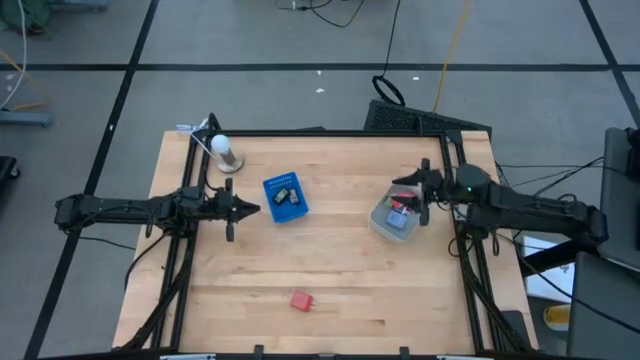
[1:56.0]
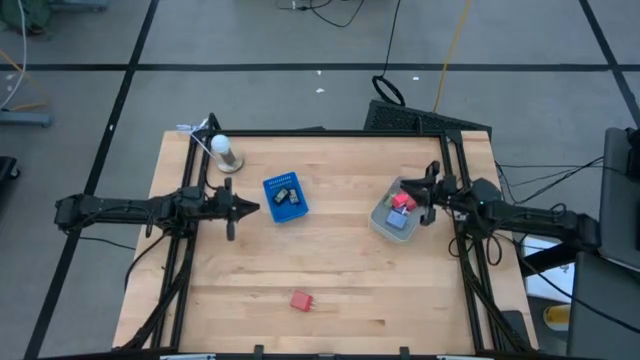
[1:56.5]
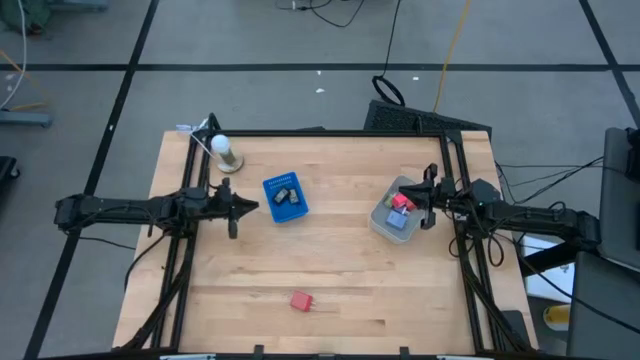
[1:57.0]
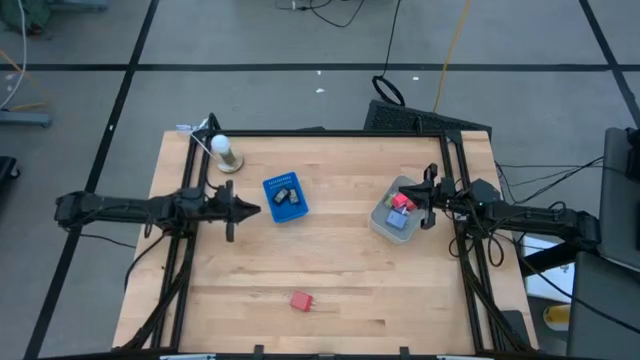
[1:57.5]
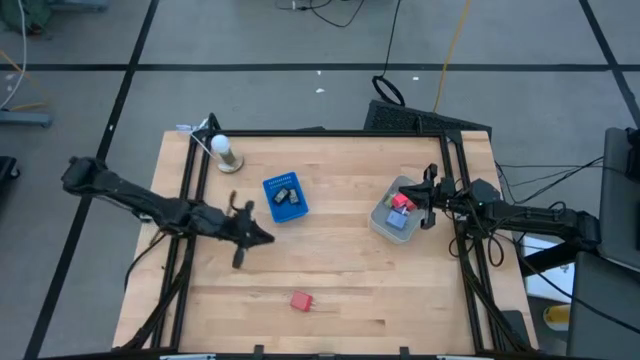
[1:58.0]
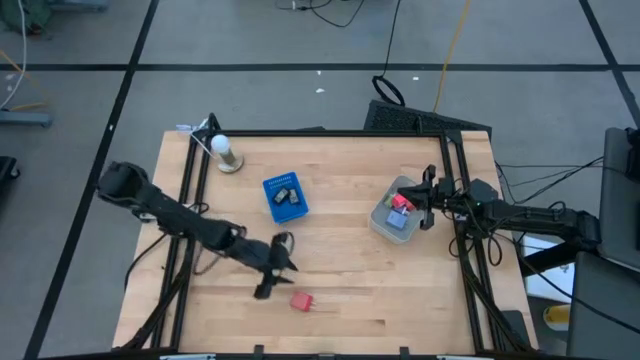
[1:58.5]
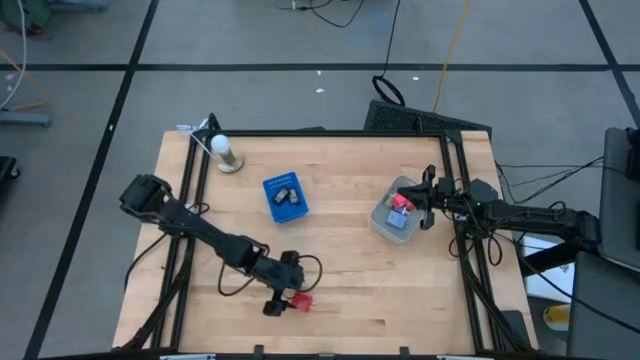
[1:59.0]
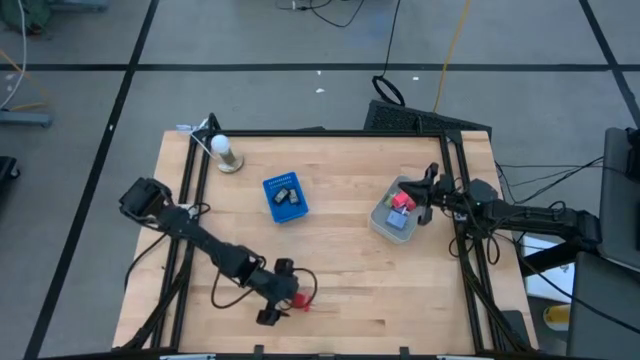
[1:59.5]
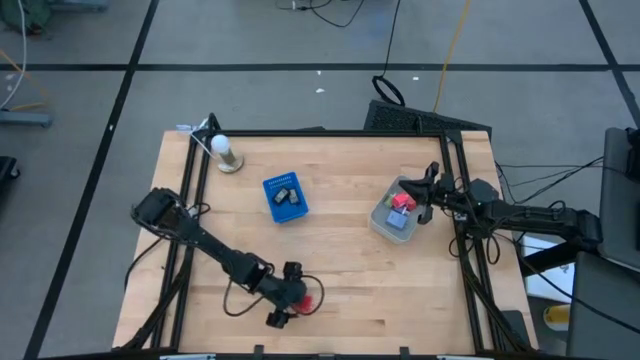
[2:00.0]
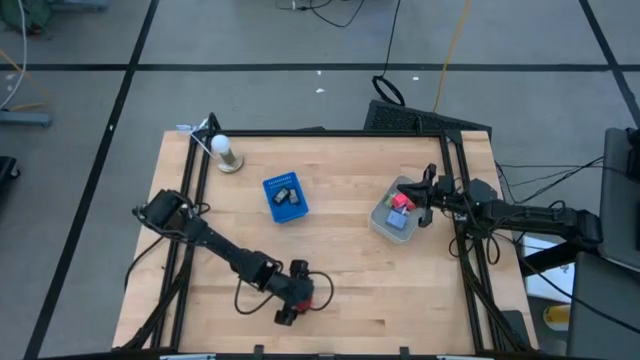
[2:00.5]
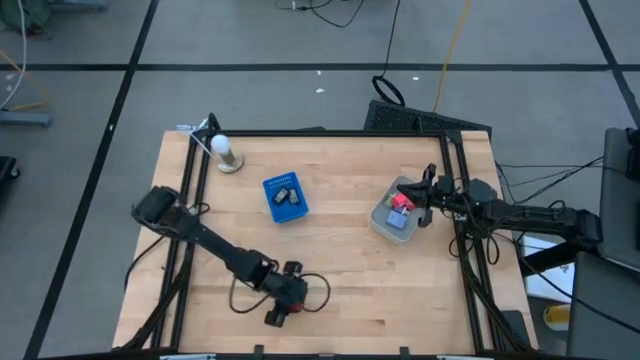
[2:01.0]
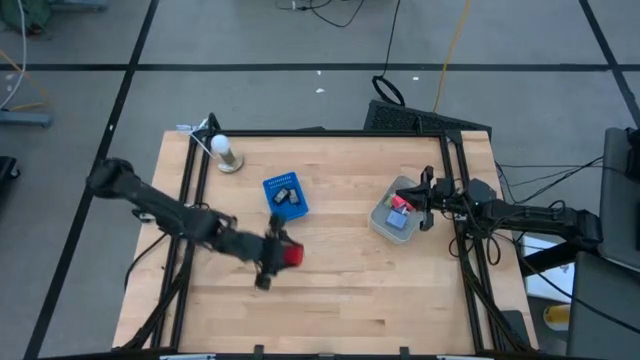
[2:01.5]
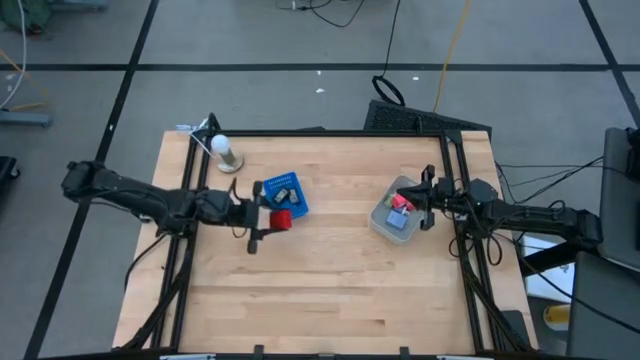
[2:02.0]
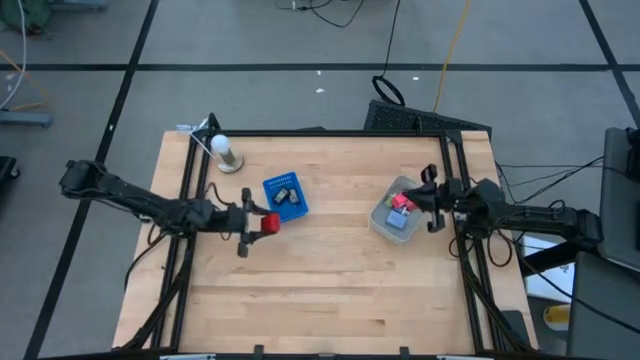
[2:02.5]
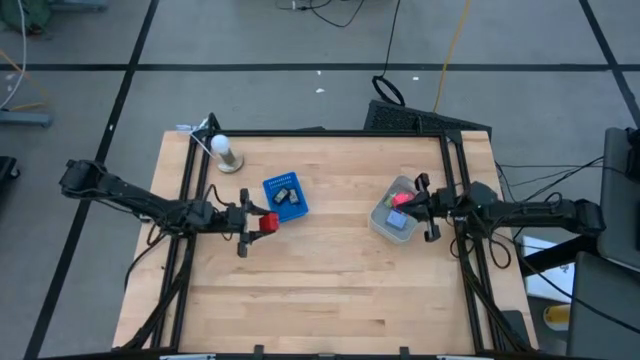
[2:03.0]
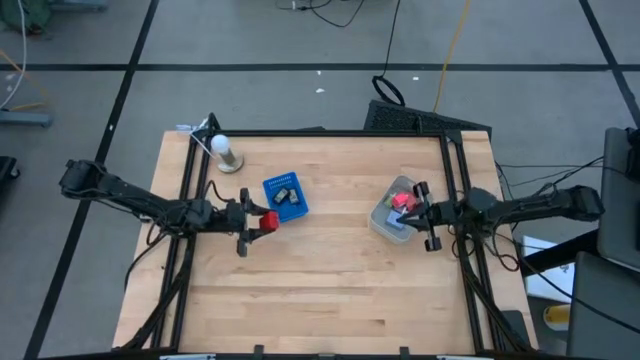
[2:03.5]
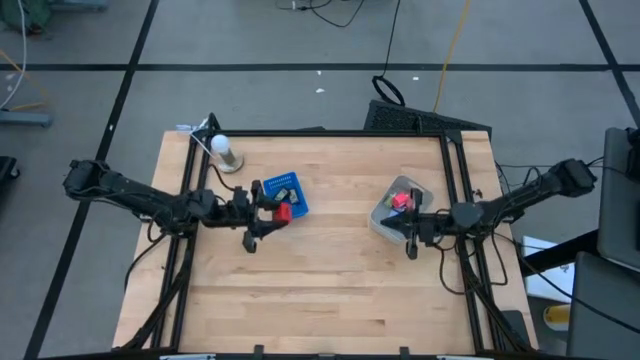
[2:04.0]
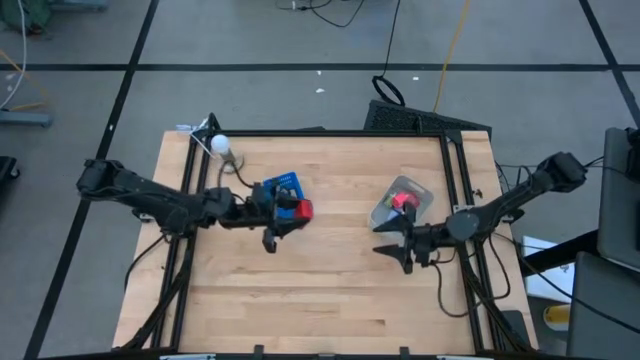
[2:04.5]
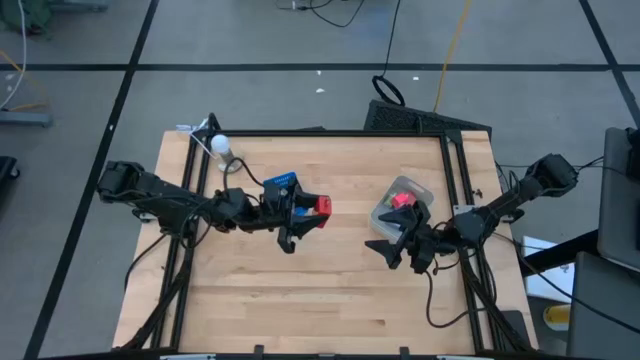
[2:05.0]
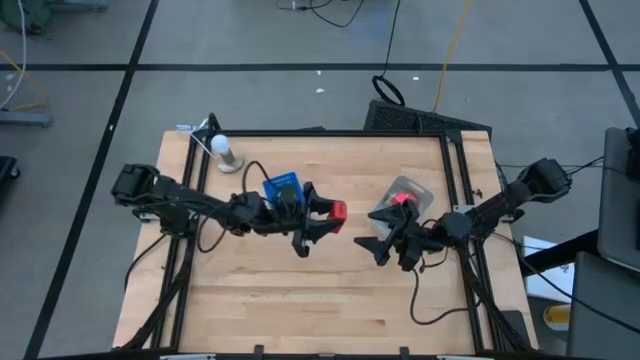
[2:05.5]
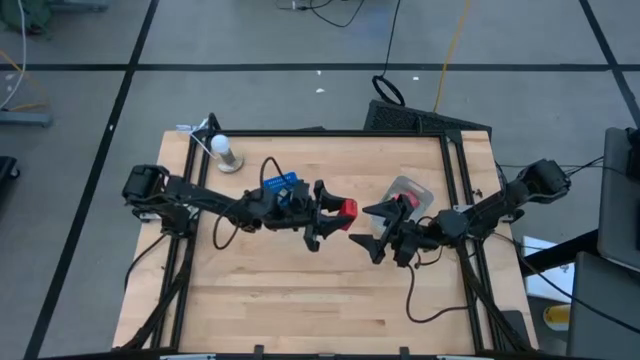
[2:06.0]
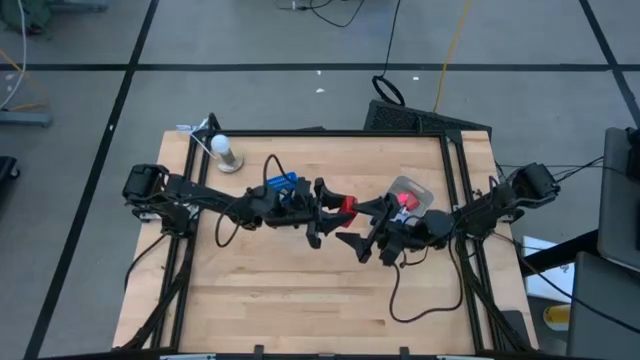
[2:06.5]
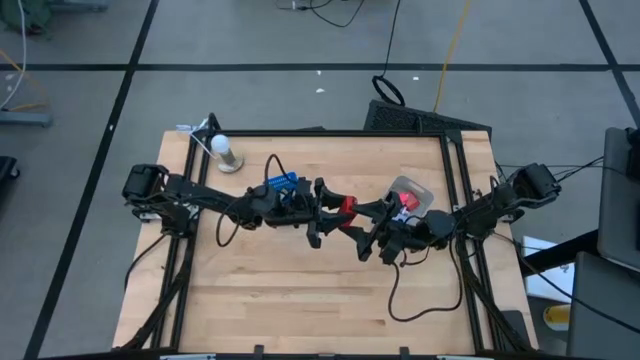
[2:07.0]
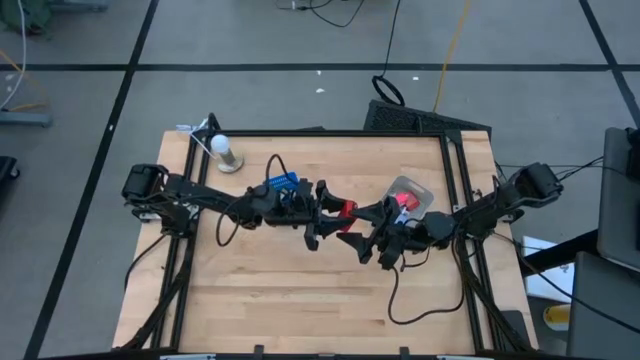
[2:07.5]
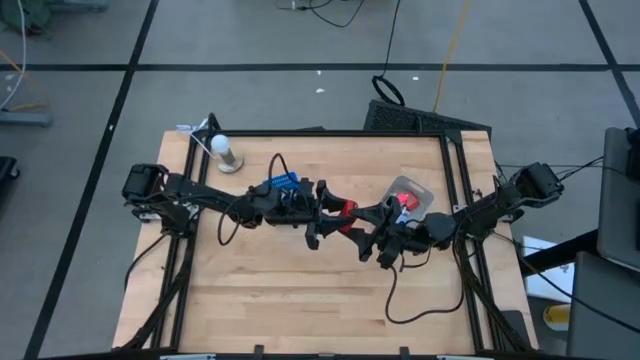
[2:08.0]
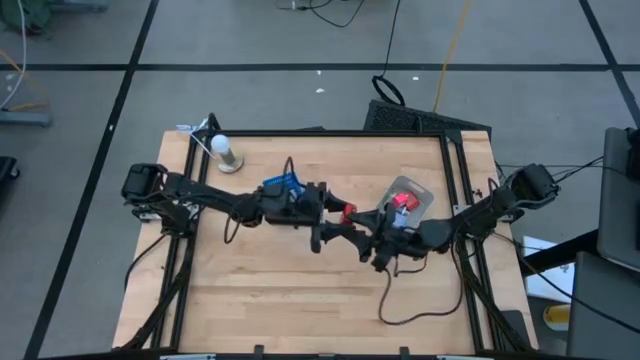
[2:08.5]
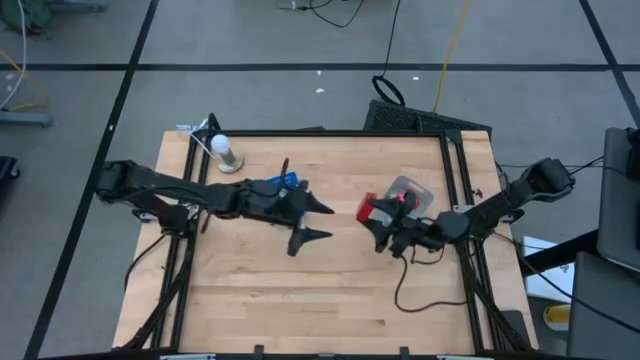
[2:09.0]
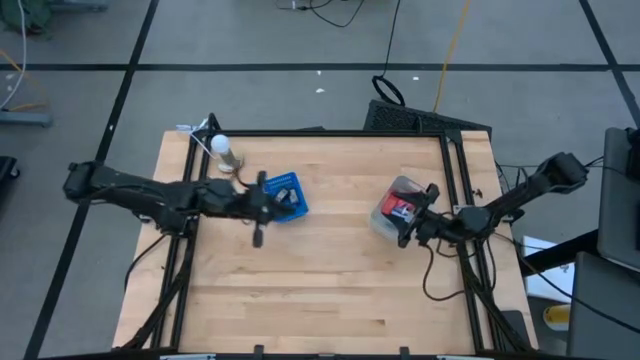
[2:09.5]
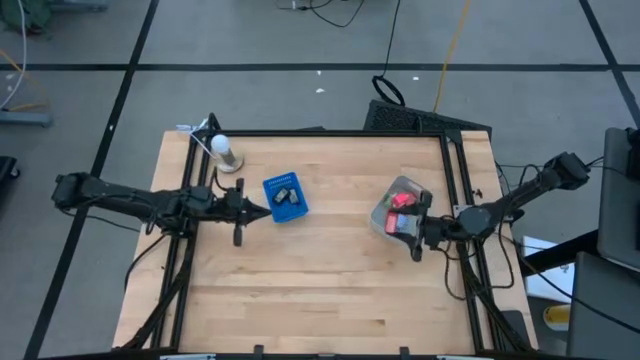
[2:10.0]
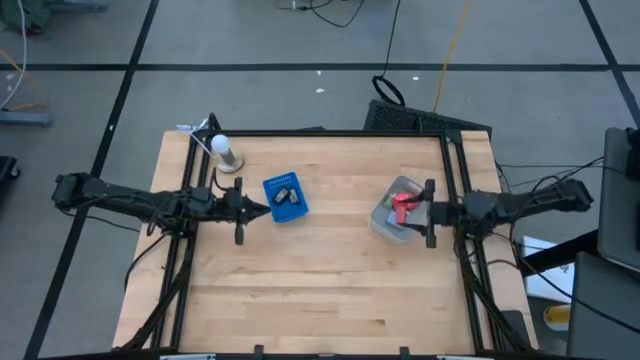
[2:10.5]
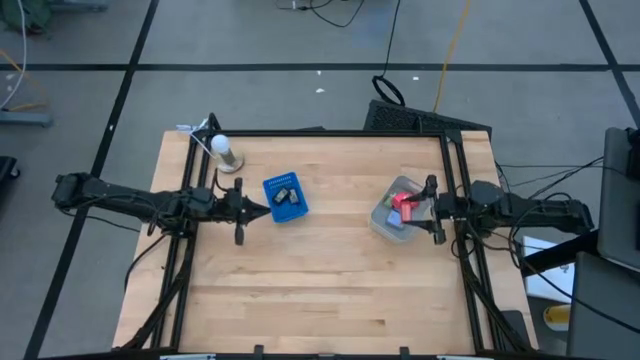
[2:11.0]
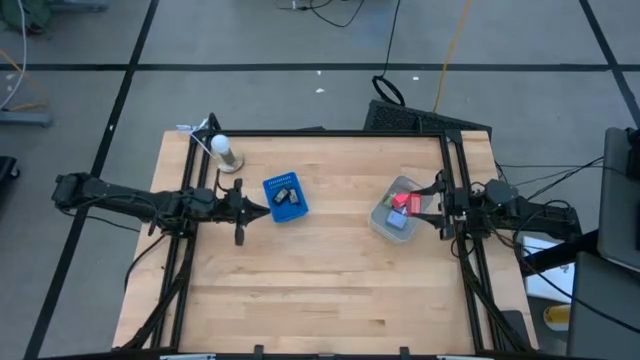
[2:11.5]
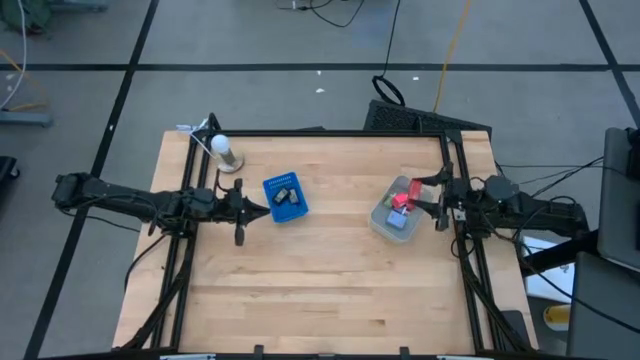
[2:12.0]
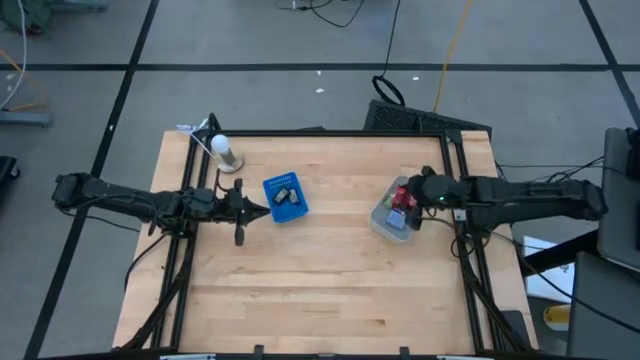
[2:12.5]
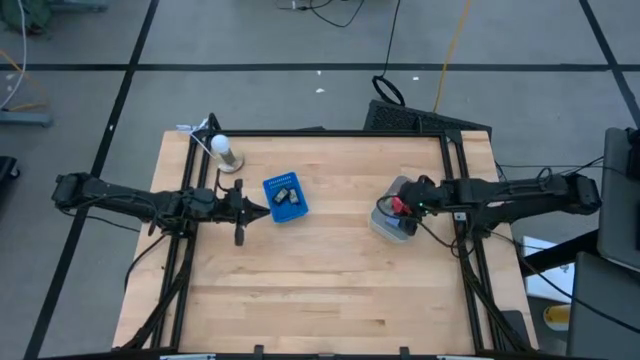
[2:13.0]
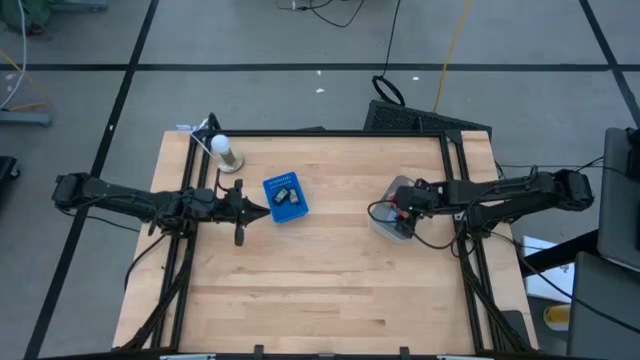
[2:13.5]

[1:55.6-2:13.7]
Task: Pick & Place Office items
Put the red charger adapter into the gray bin

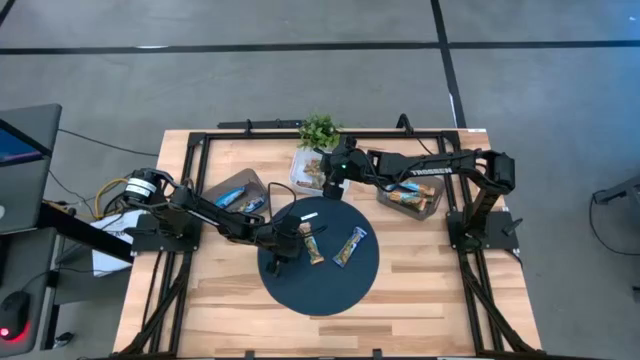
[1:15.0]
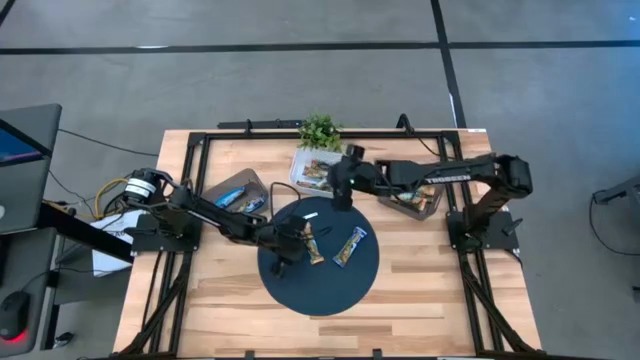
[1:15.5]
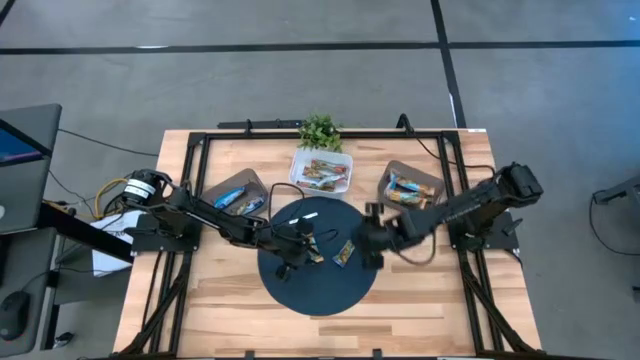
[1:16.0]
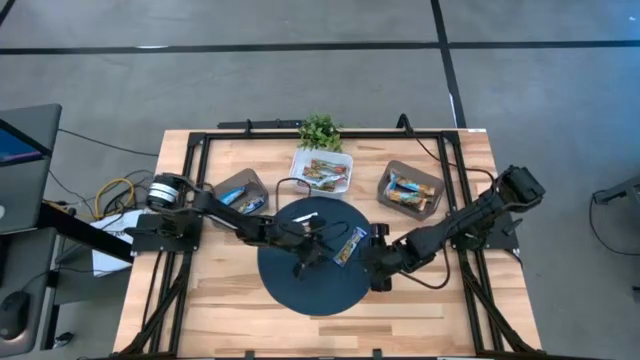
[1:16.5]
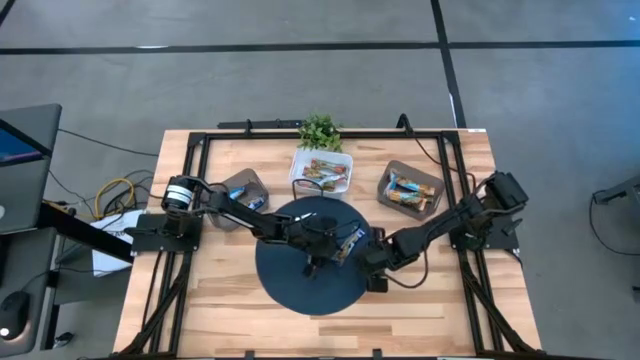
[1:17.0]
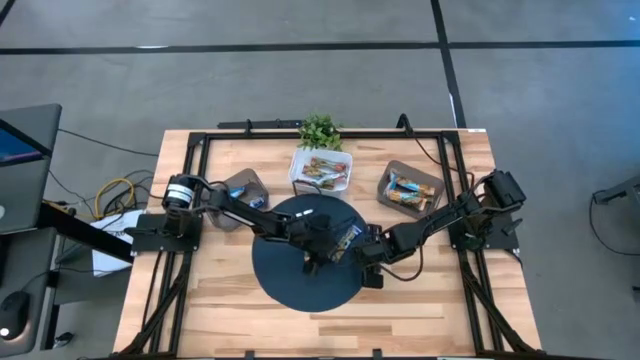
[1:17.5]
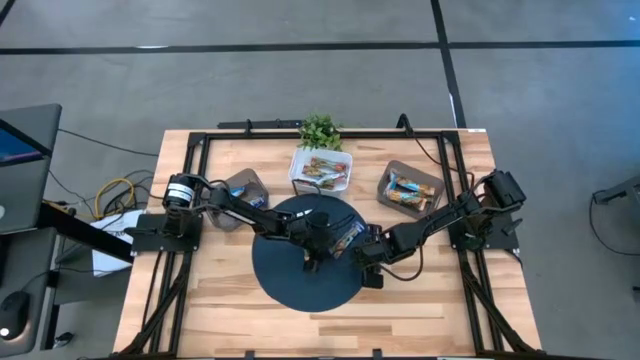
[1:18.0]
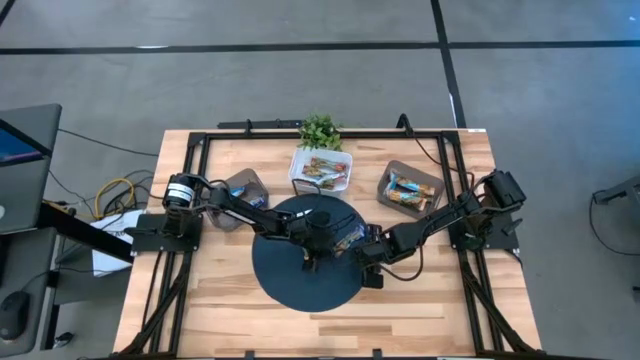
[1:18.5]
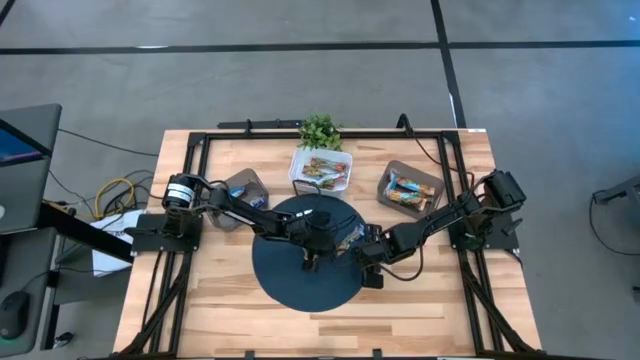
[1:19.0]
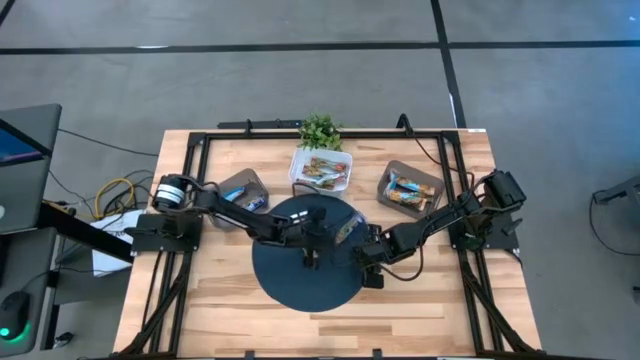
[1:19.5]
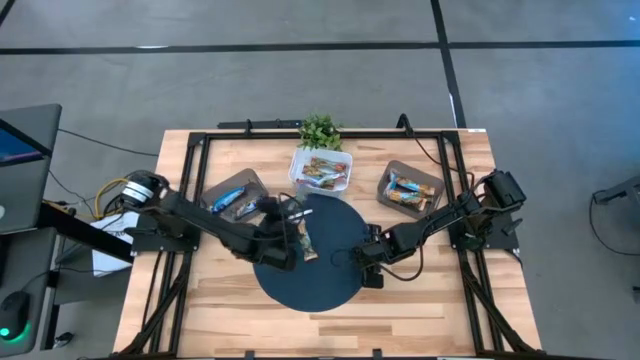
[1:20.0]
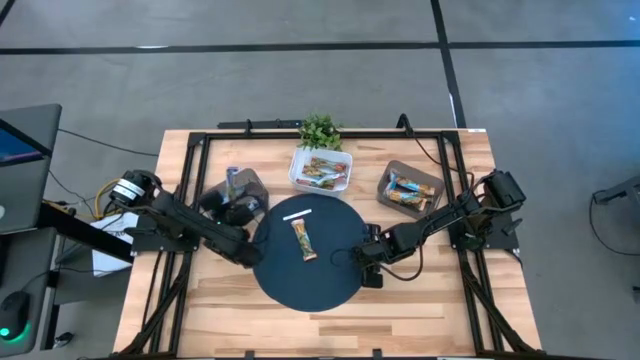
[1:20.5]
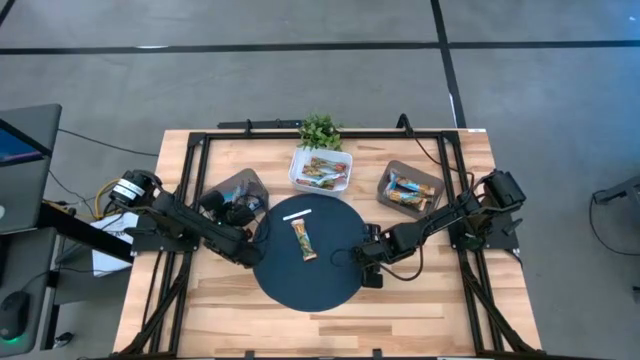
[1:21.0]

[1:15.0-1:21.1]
Task: Pick and place Granola Bars by type
Put the blue granola bar into the left black bin
